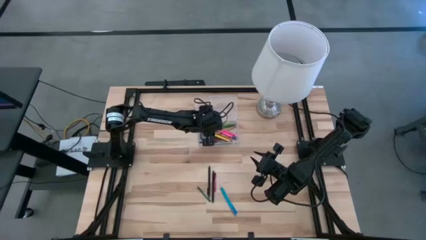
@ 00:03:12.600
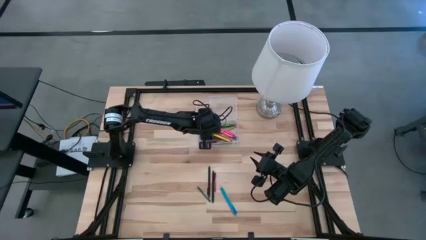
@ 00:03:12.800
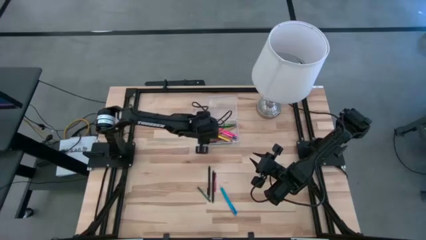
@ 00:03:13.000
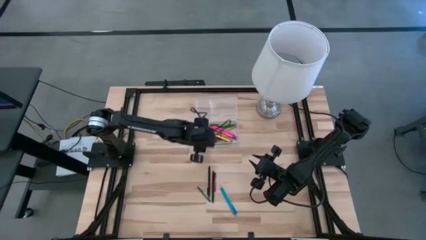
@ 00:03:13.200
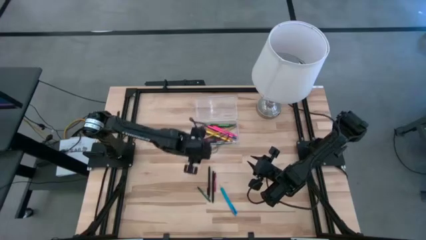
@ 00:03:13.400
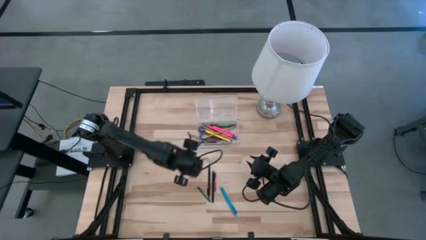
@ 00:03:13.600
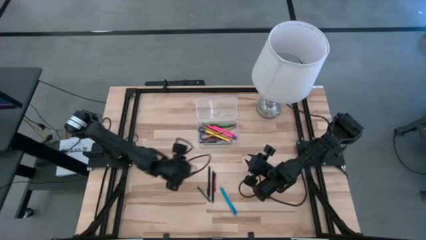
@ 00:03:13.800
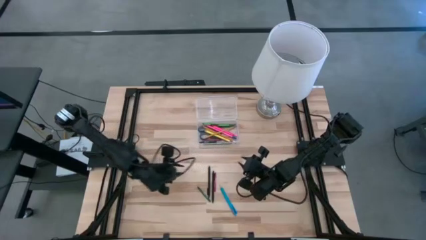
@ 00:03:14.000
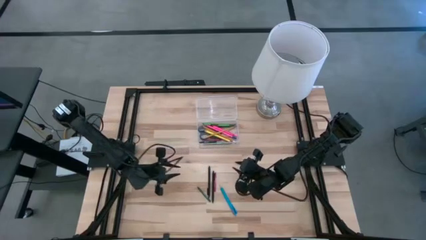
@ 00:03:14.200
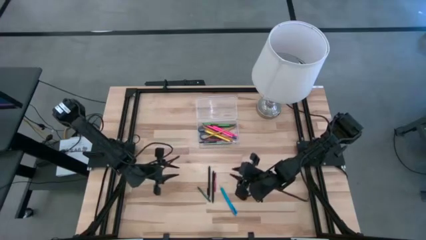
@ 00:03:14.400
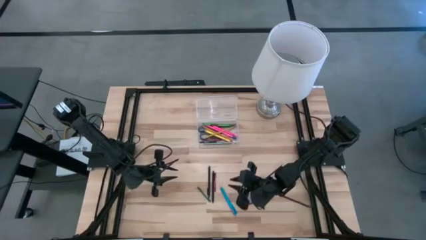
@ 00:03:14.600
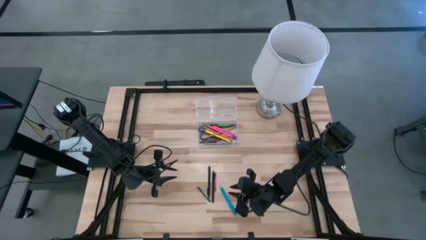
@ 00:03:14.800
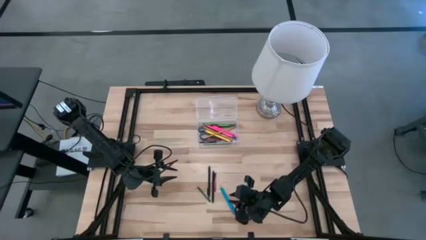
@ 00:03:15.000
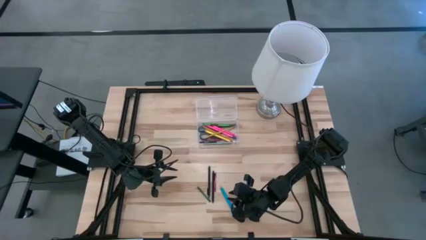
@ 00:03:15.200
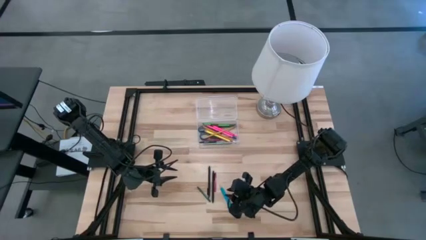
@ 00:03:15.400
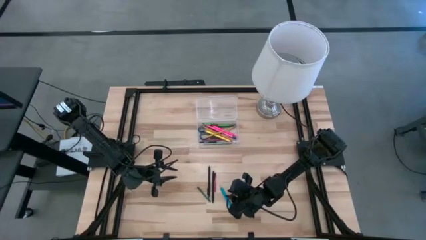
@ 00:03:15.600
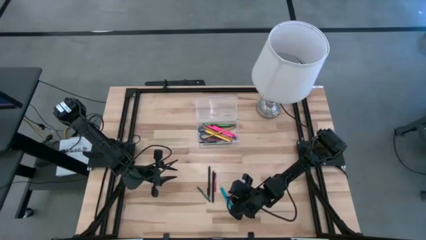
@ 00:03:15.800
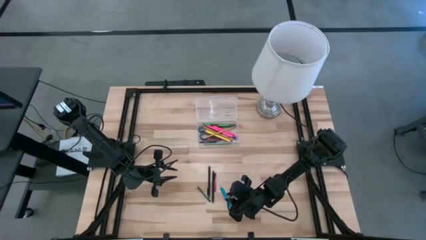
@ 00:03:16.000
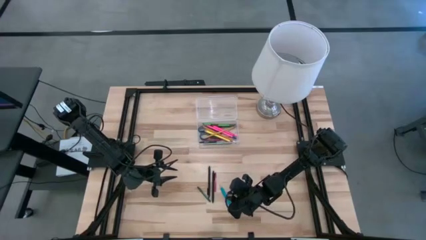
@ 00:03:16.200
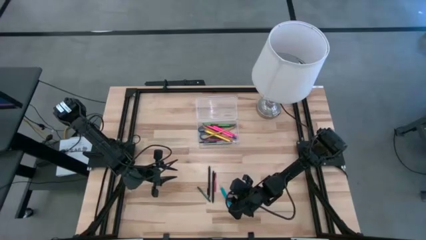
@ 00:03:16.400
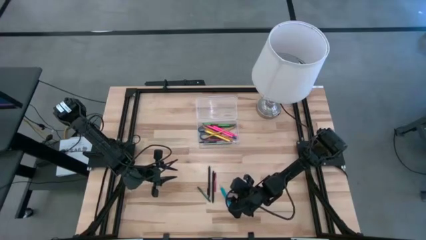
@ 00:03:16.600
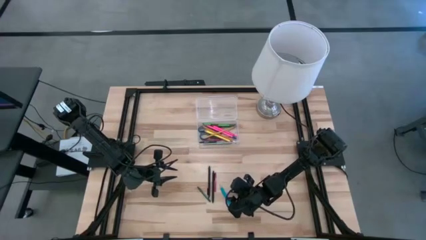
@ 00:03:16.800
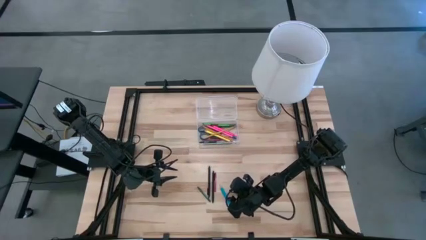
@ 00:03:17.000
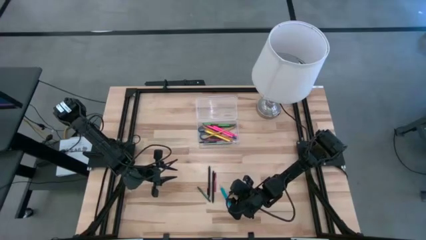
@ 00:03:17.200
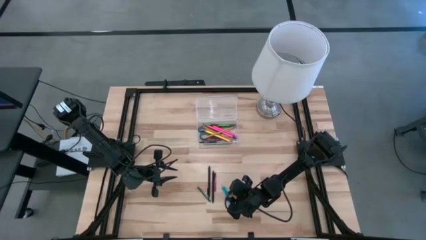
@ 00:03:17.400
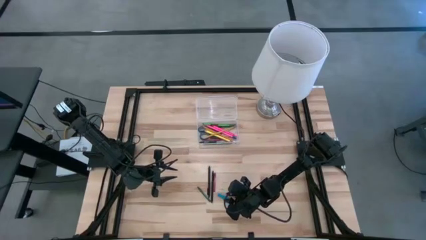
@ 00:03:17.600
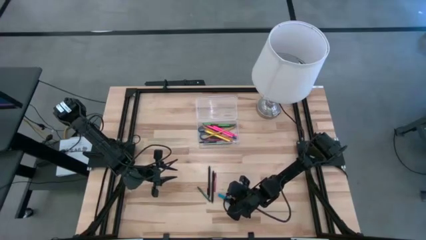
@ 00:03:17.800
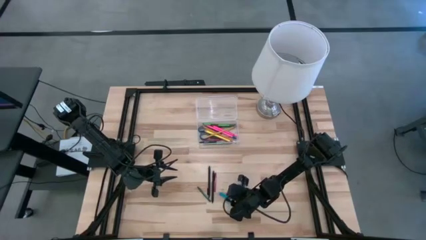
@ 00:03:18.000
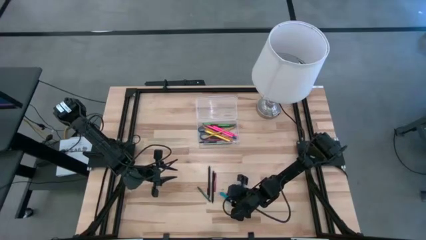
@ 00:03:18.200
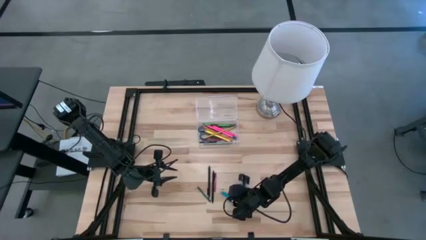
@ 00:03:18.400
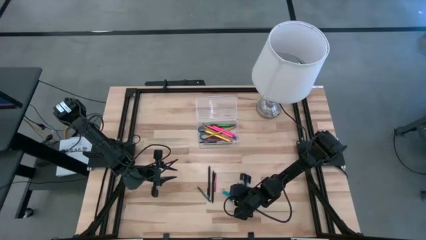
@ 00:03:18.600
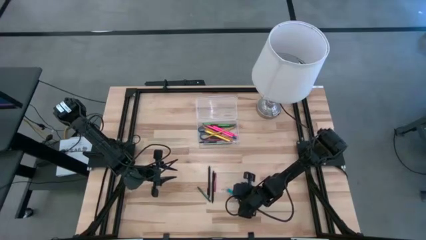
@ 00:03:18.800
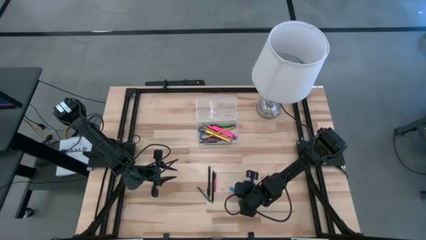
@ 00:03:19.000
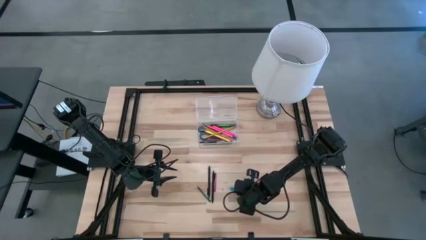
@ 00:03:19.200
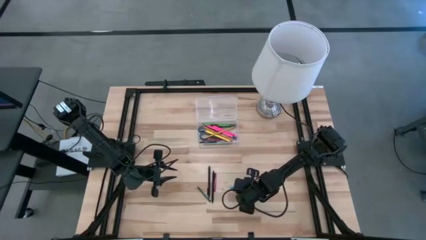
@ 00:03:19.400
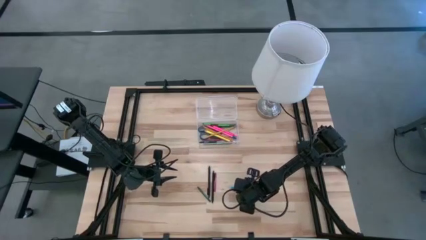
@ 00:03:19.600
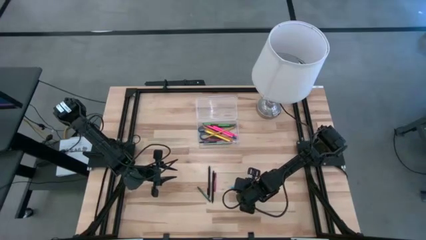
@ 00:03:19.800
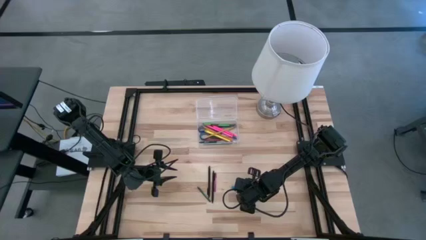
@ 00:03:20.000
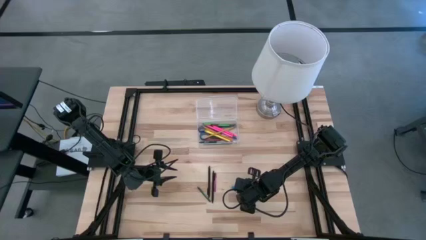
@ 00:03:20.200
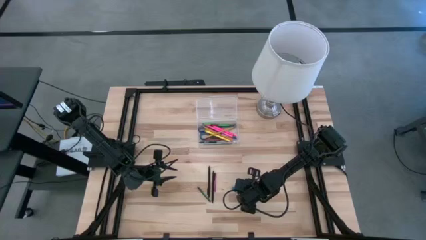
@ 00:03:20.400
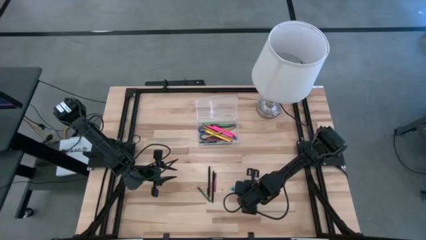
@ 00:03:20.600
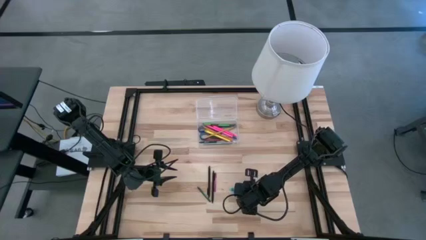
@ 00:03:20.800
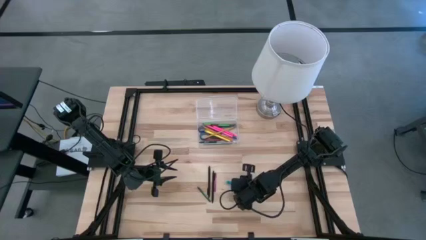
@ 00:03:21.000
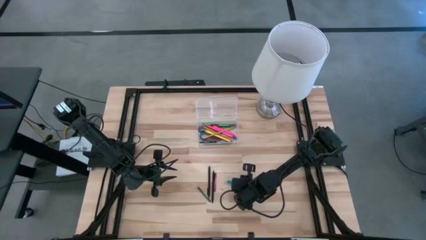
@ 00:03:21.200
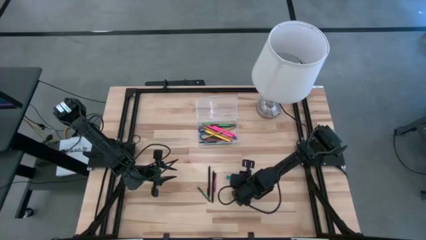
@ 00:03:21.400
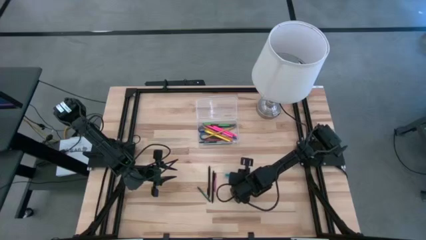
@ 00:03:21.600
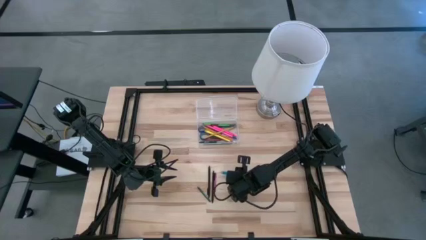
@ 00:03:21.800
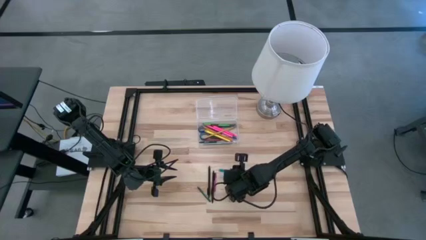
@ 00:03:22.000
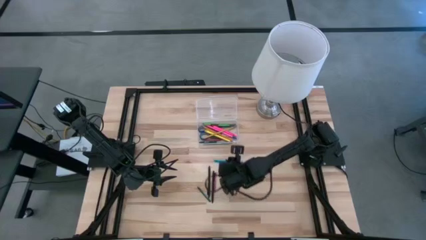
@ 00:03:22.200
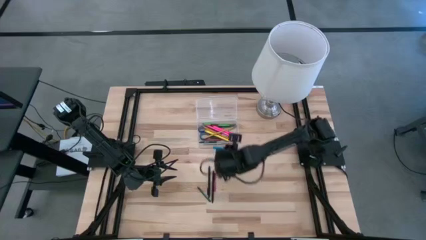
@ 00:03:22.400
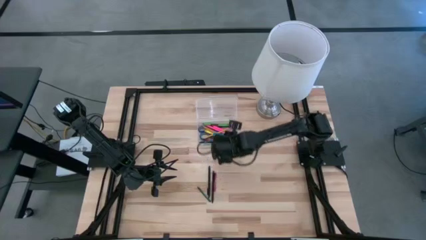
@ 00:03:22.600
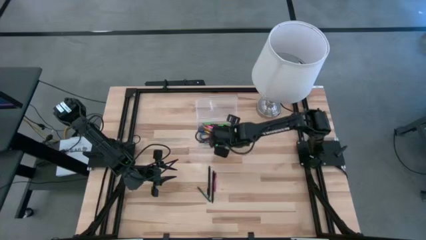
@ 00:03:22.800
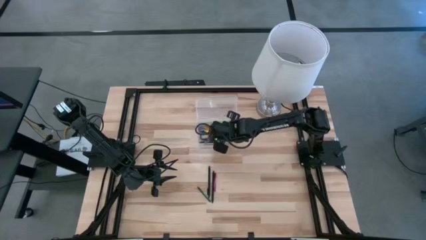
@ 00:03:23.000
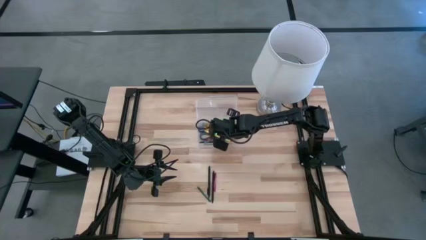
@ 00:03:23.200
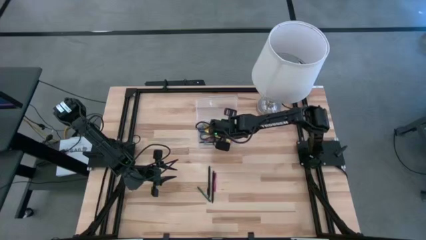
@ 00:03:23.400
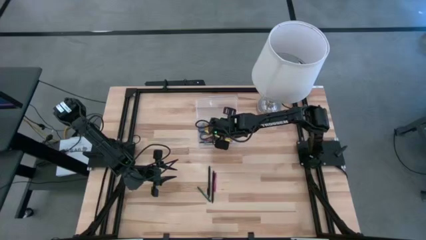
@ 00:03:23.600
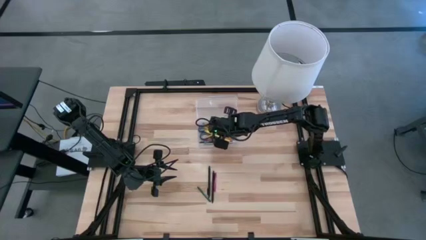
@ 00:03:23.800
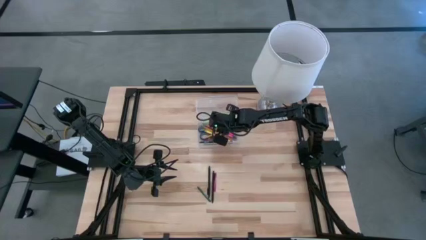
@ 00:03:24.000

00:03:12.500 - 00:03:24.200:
Task: Pick & place school supplies into a supply box
Put the blue pen into the supply box
